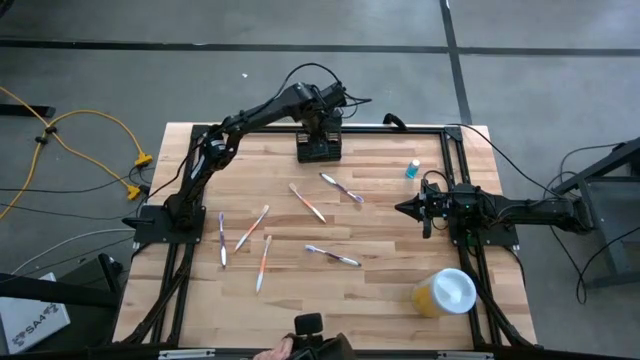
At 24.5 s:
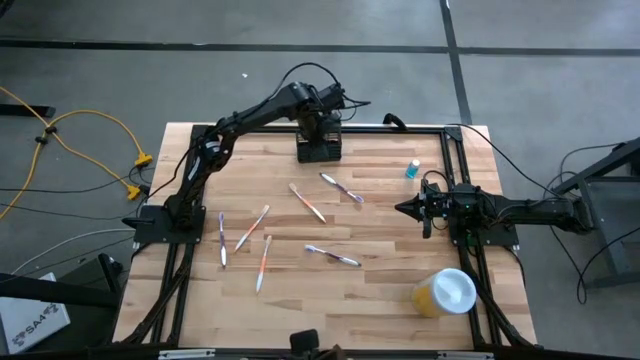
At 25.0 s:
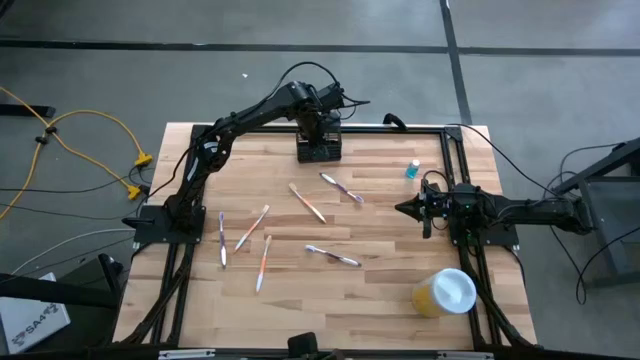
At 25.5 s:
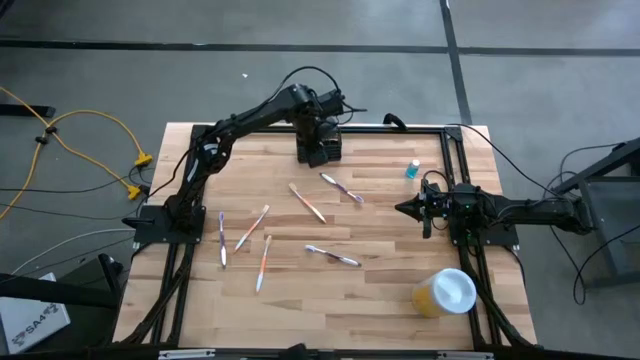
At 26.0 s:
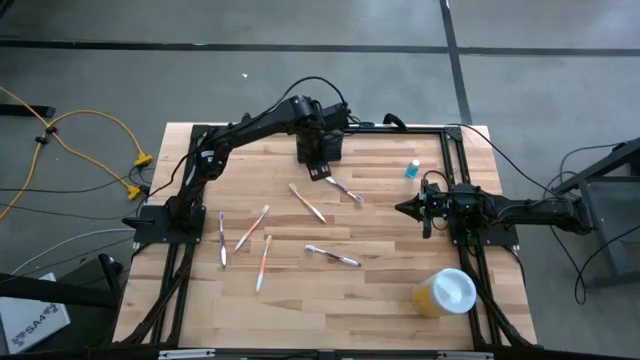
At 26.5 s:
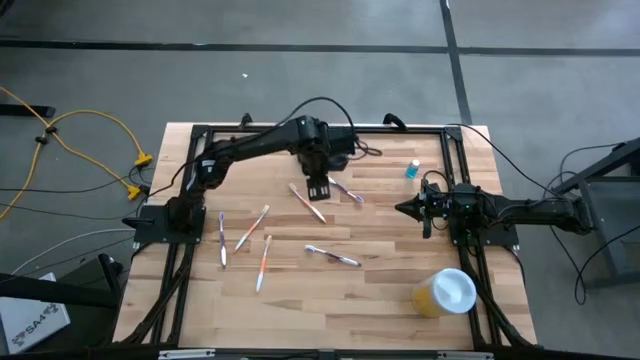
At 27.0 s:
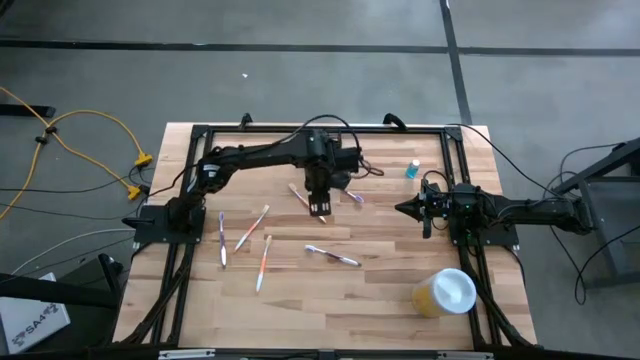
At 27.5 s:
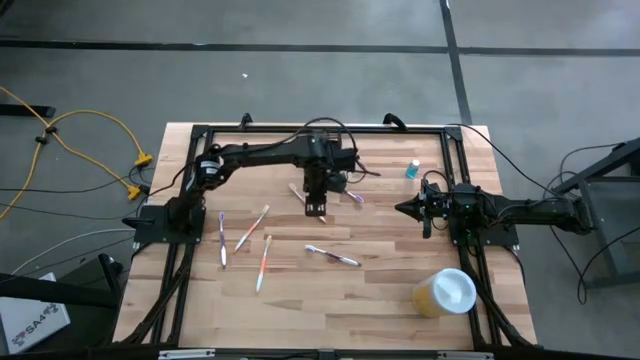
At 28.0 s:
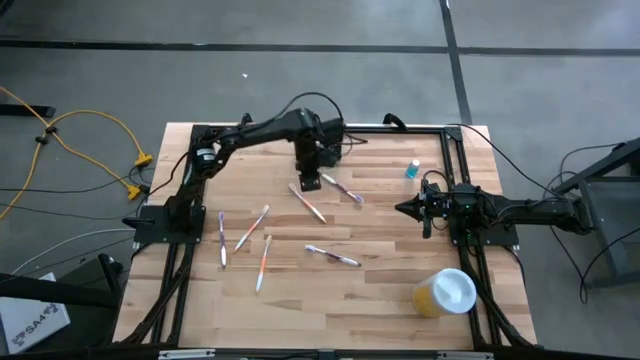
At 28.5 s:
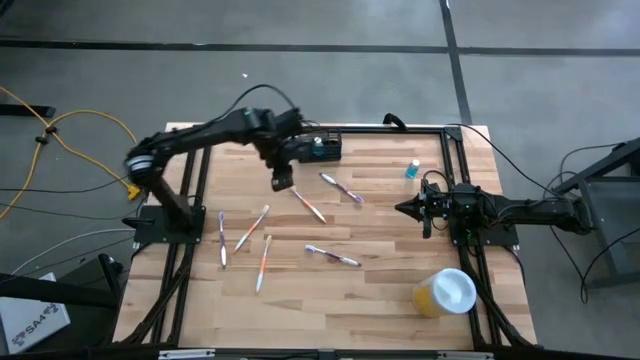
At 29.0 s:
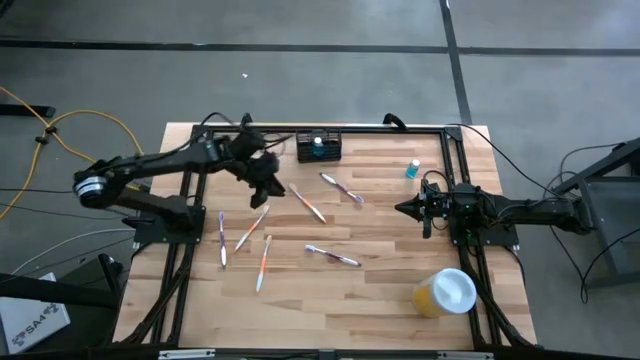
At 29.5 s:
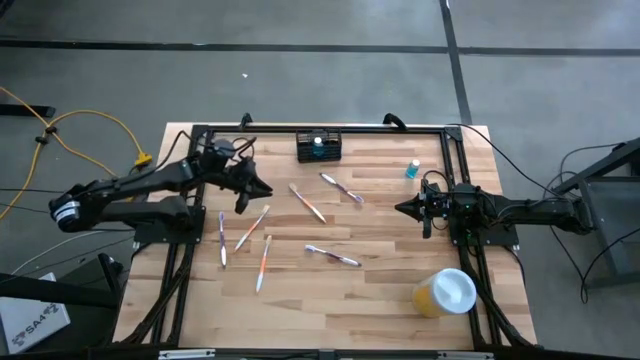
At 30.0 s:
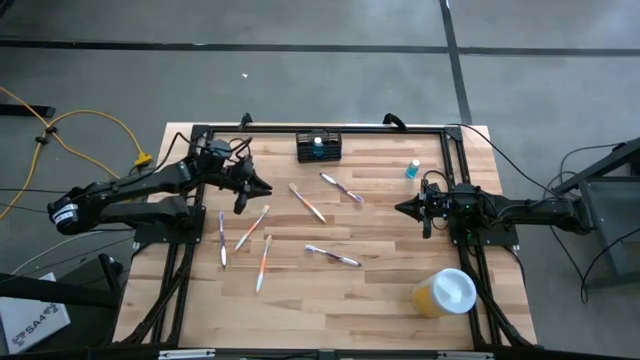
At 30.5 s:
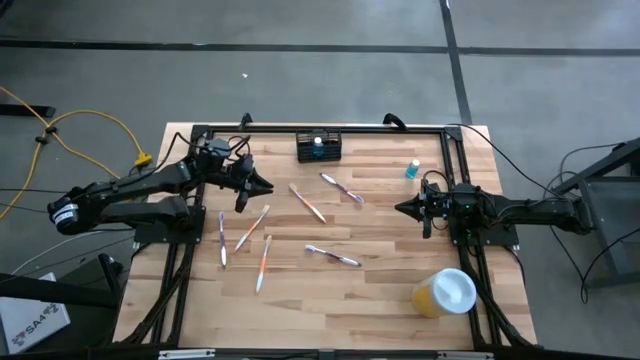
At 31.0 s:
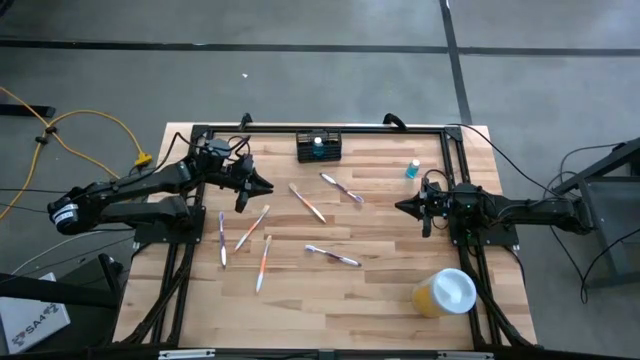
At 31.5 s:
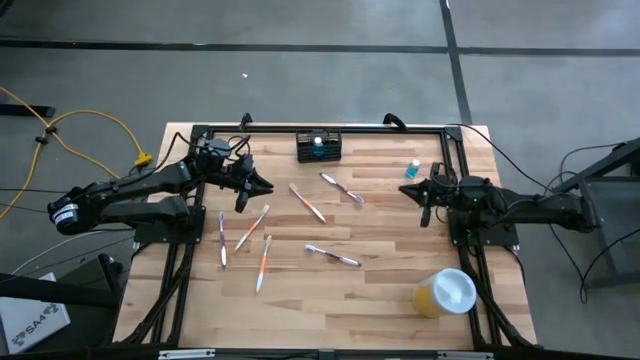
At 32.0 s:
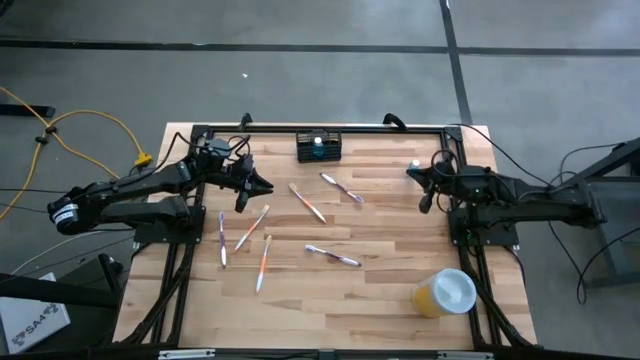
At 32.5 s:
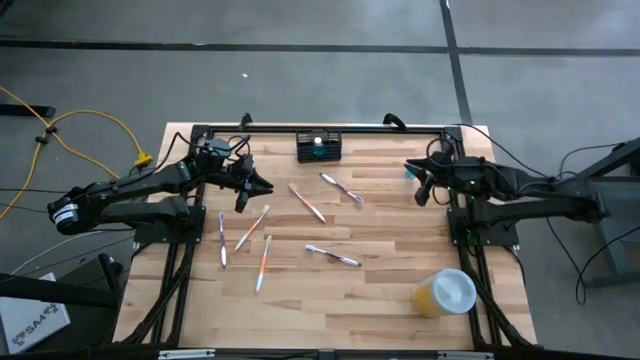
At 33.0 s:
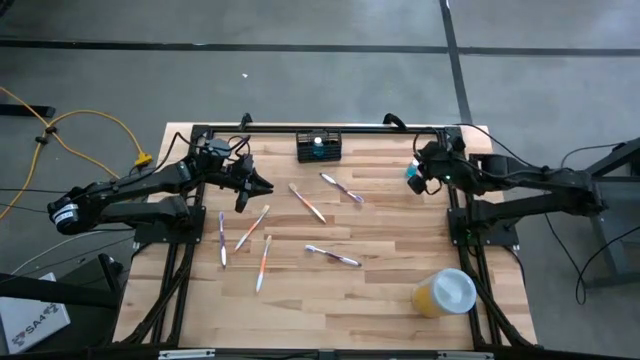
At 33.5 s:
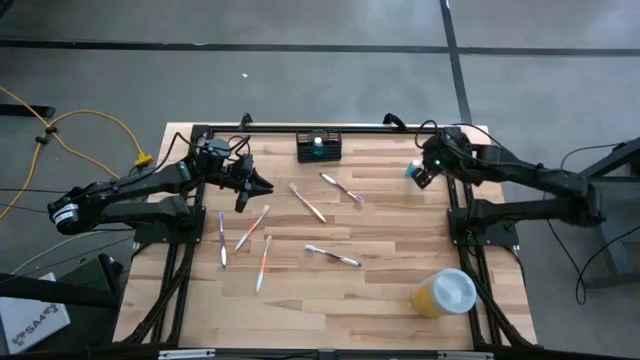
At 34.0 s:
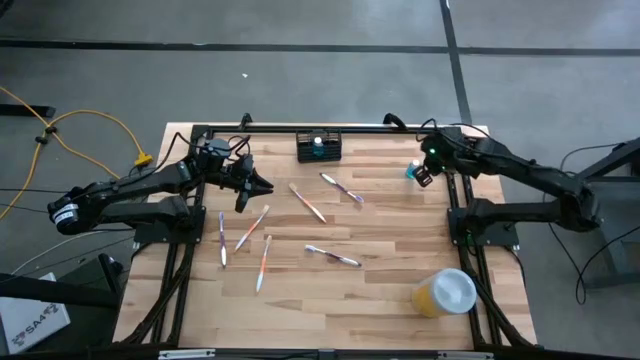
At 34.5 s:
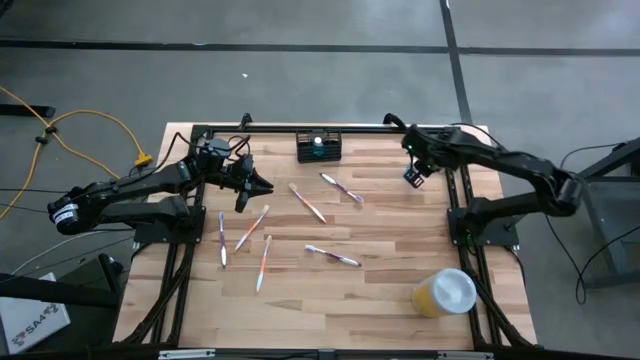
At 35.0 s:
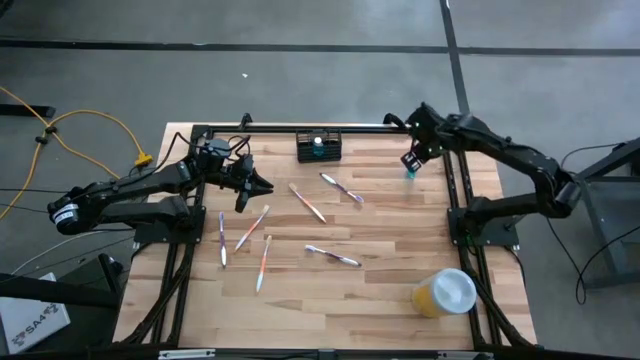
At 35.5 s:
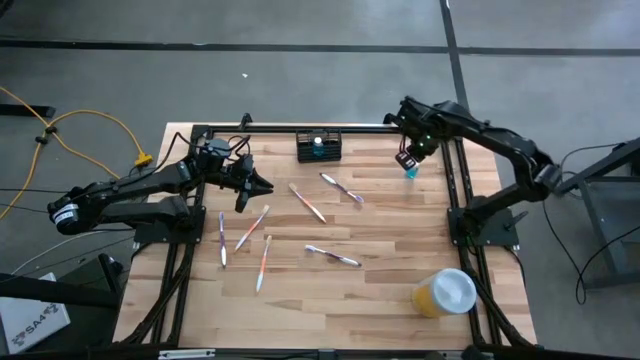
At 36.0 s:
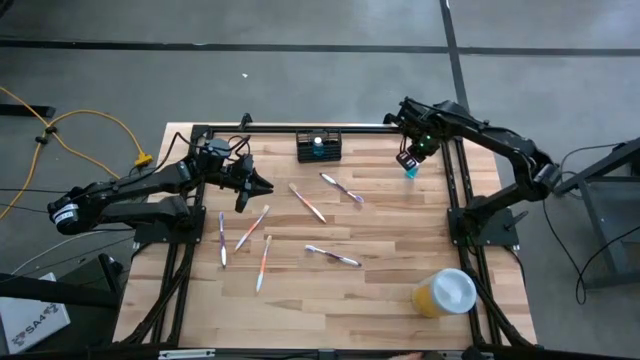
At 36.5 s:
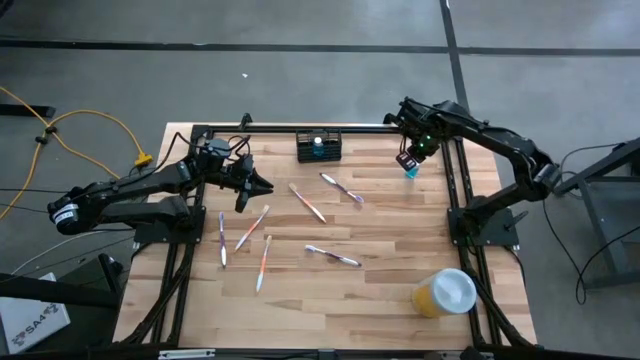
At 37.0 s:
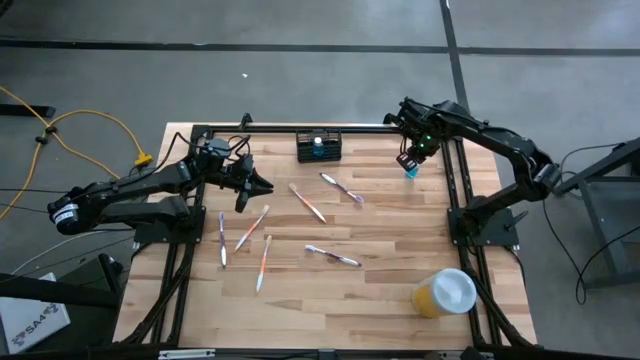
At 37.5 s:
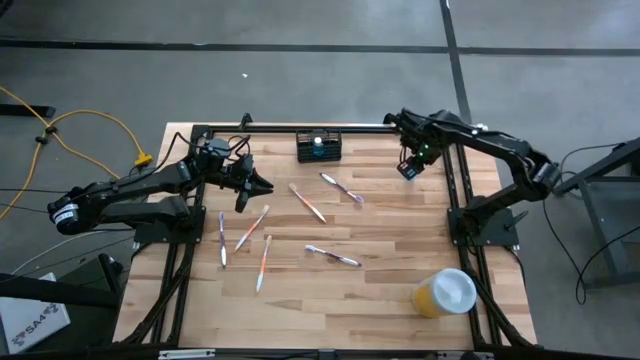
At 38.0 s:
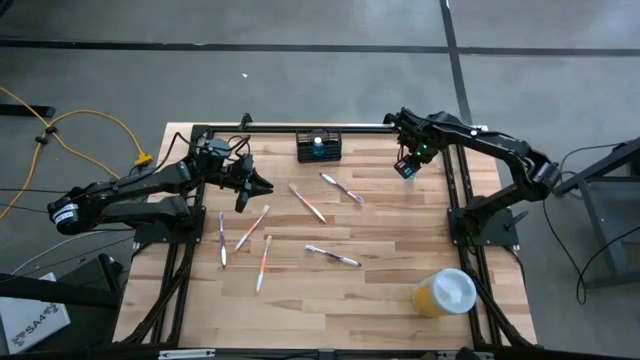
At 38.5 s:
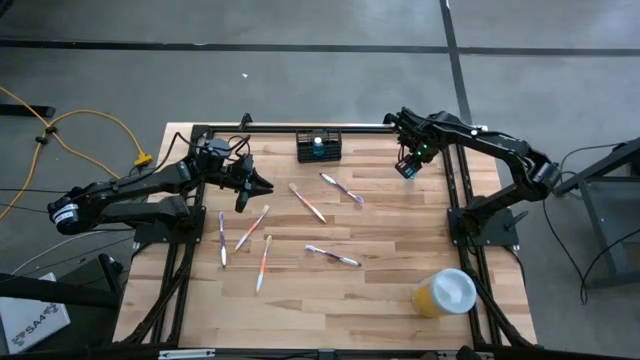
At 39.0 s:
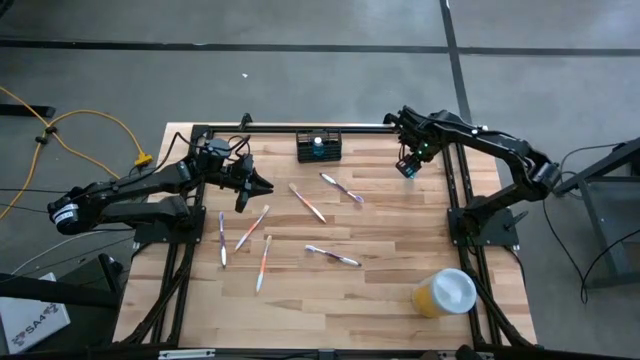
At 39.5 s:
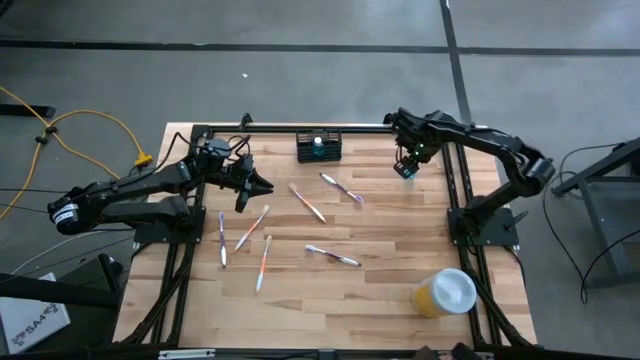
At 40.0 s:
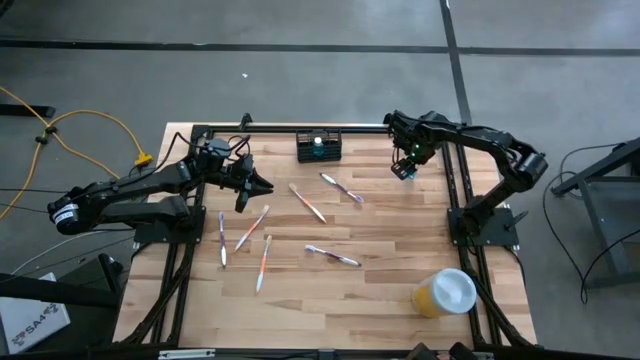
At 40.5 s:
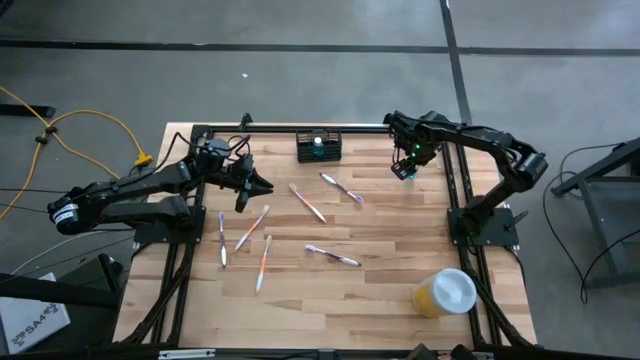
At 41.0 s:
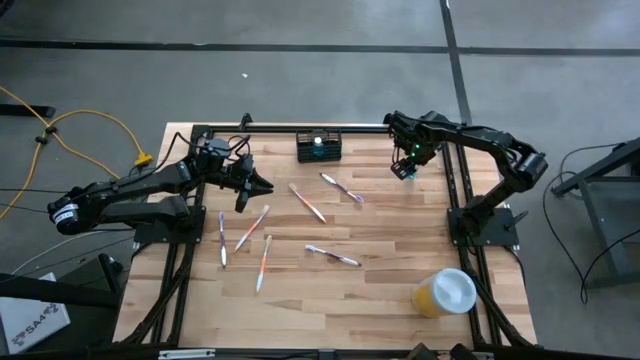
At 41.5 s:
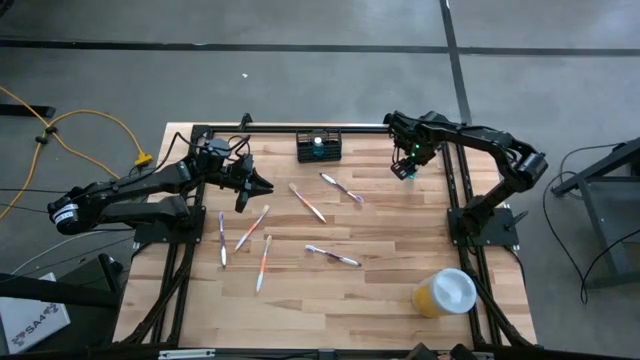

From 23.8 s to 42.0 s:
Task: Pick & Place toothbrushing station
Put the blue mouthwash into the wire organizer

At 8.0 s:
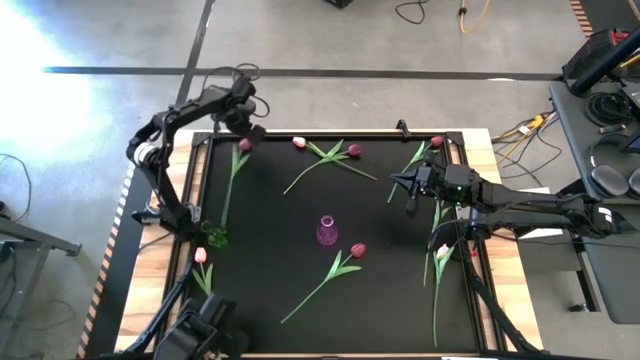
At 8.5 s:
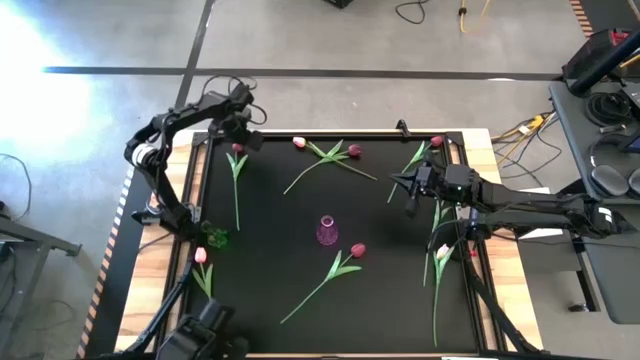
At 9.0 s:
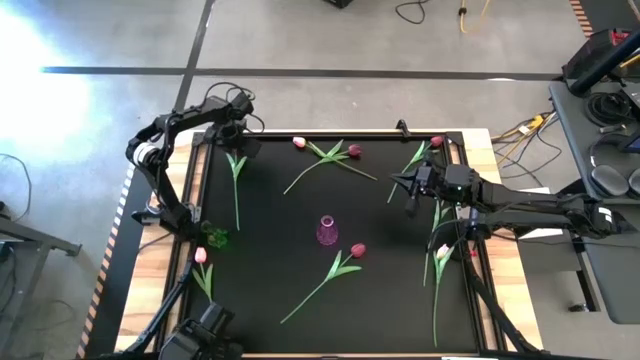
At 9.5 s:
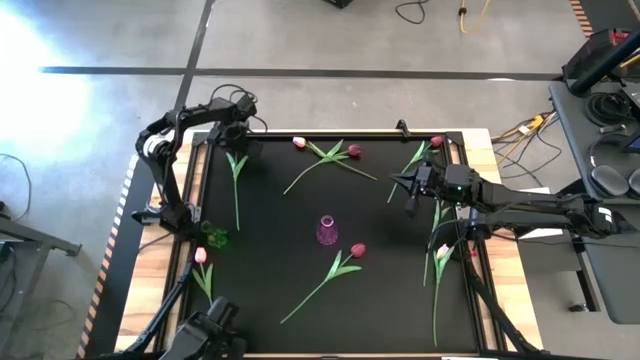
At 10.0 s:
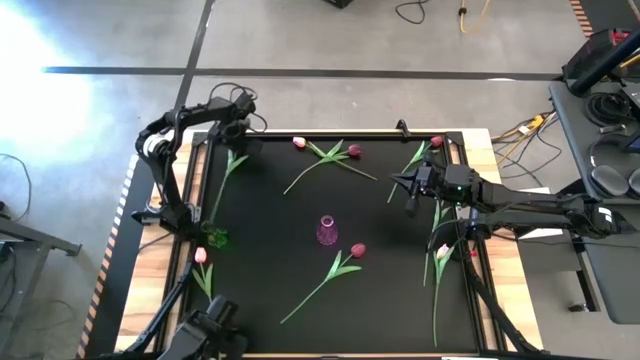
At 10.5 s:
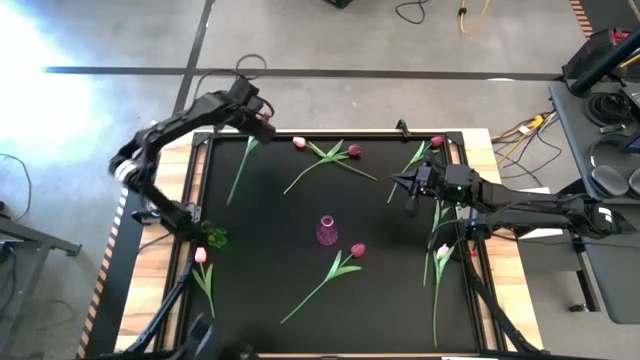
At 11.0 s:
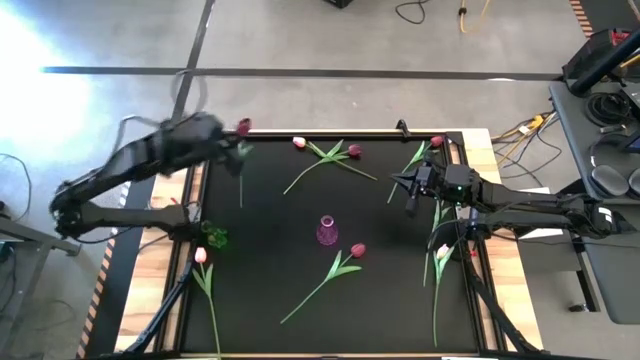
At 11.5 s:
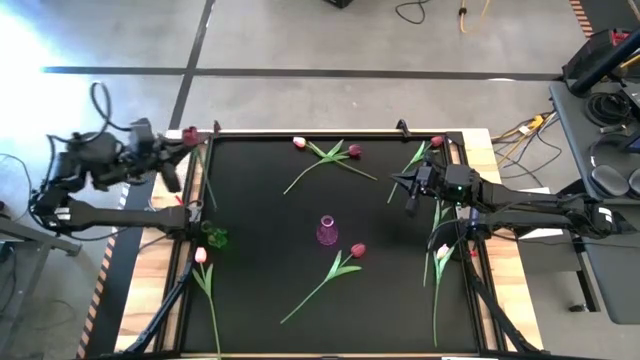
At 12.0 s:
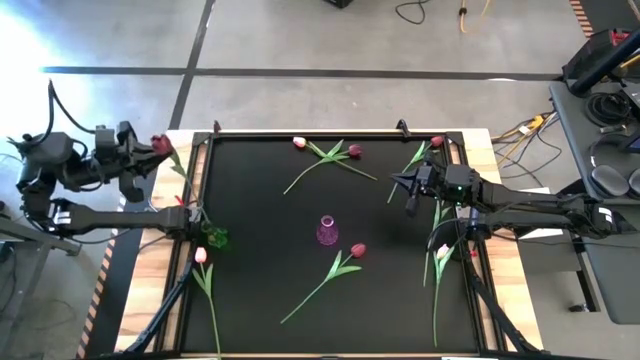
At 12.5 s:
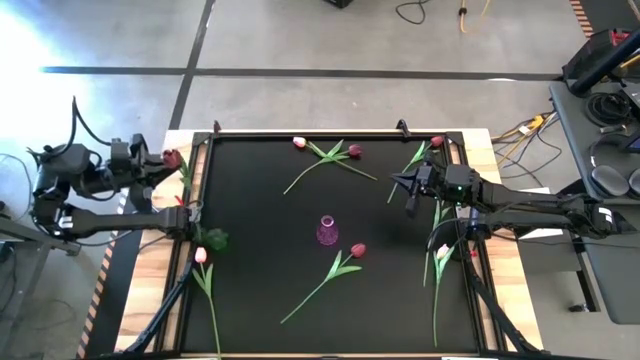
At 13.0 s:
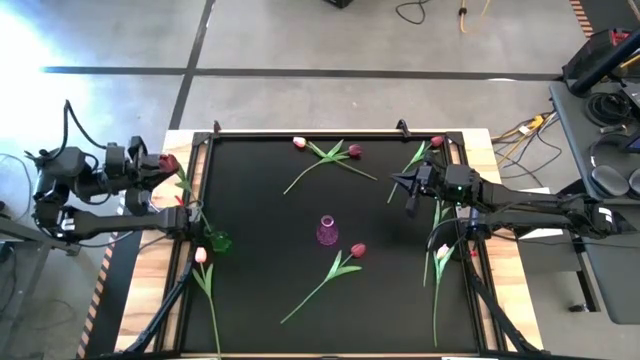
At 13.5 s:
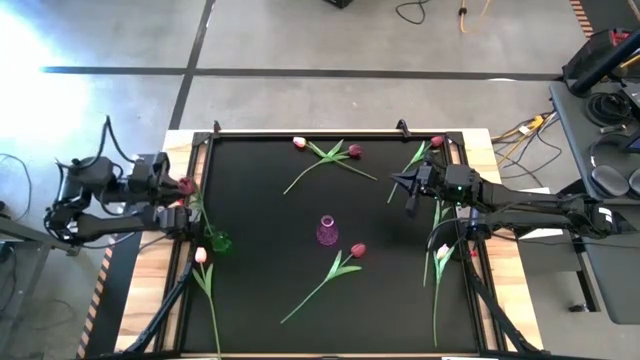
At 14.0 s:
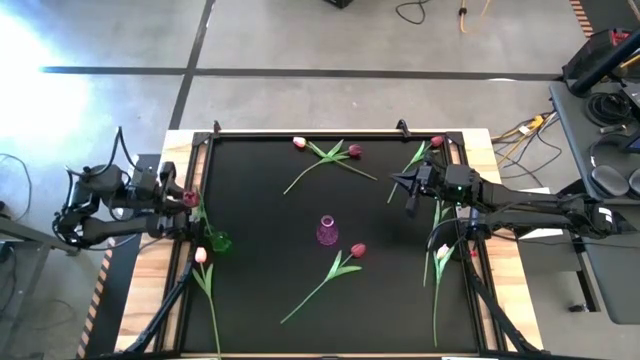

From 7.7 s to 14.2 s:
Task: Sort flowers into vase by color
Put the red tulip into the green vase
